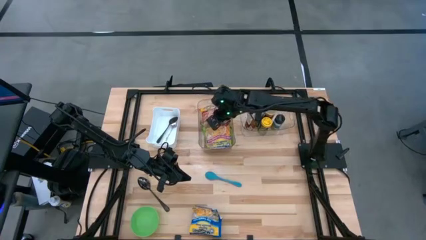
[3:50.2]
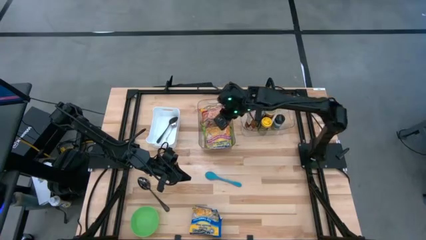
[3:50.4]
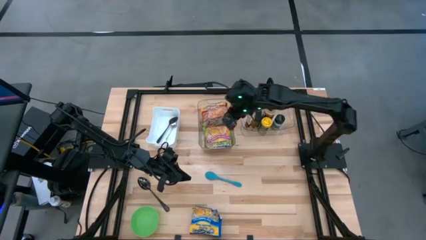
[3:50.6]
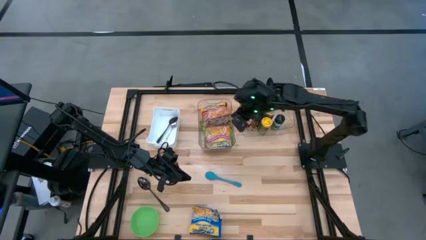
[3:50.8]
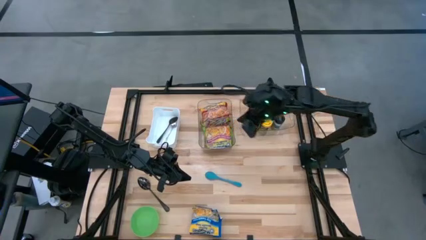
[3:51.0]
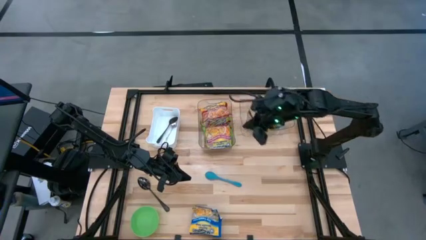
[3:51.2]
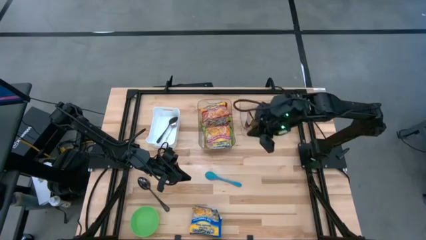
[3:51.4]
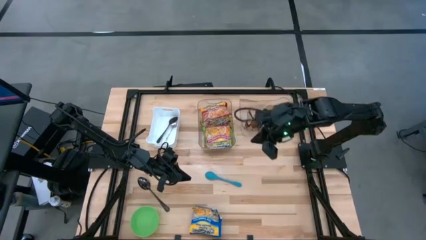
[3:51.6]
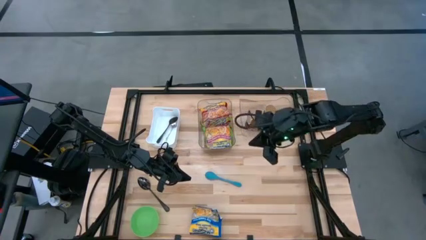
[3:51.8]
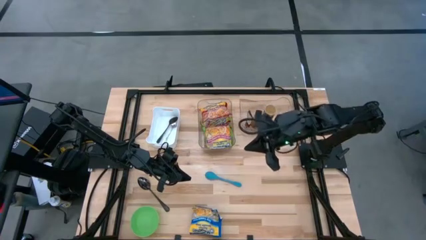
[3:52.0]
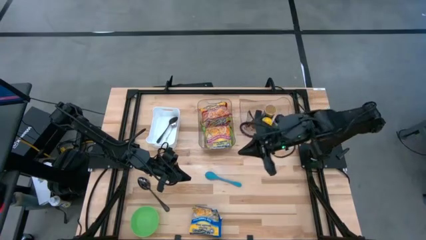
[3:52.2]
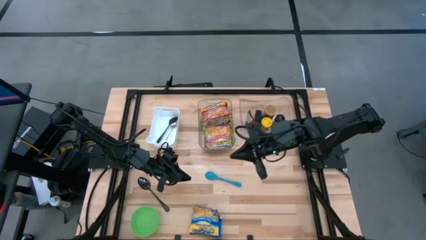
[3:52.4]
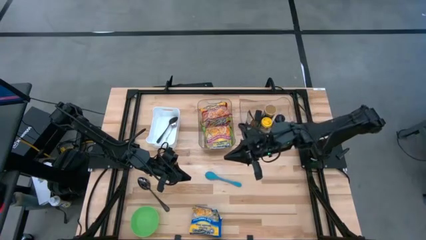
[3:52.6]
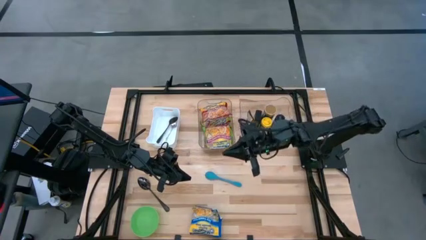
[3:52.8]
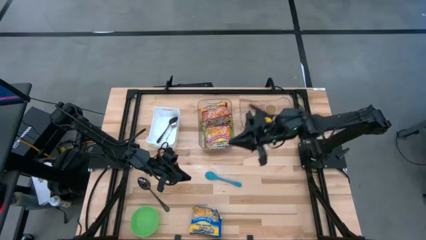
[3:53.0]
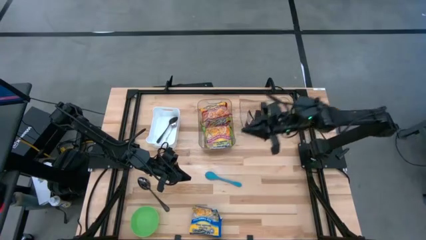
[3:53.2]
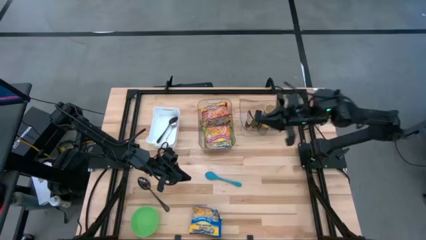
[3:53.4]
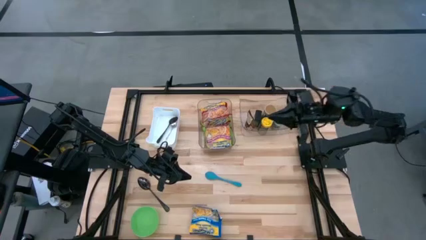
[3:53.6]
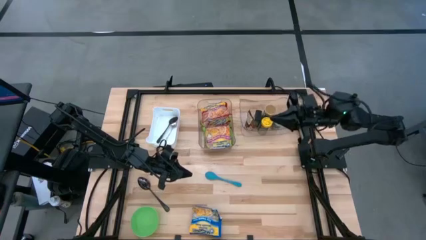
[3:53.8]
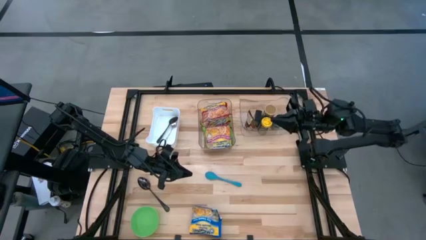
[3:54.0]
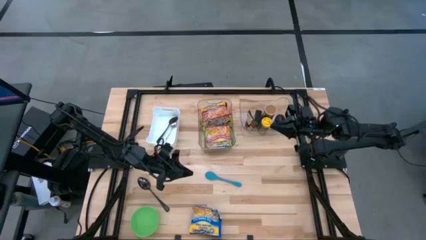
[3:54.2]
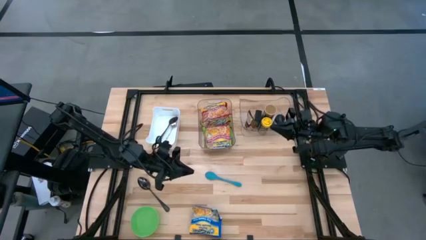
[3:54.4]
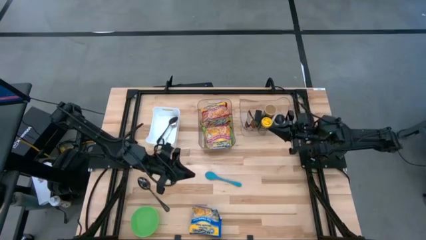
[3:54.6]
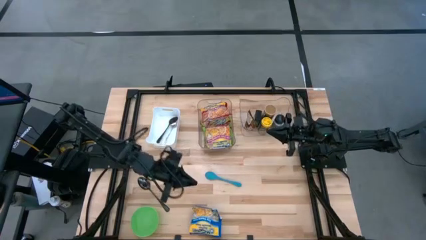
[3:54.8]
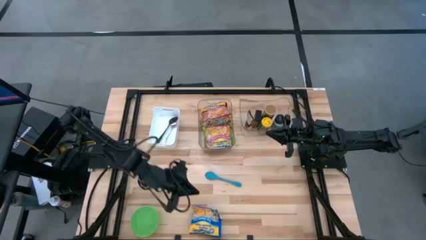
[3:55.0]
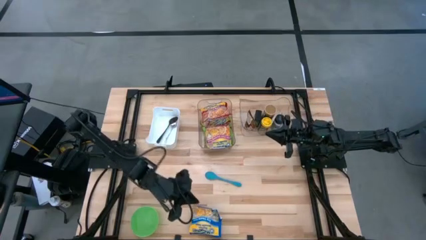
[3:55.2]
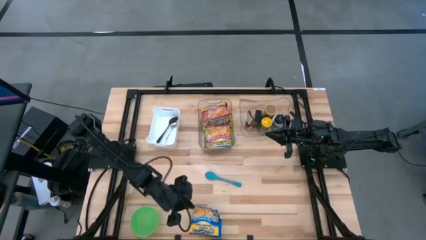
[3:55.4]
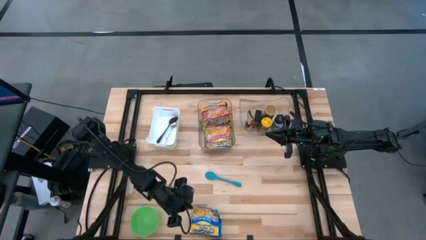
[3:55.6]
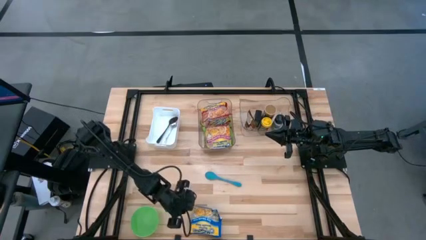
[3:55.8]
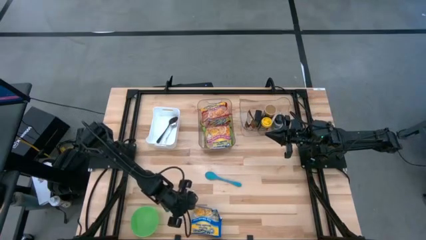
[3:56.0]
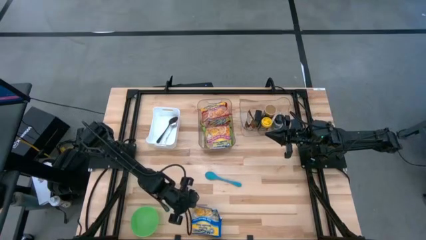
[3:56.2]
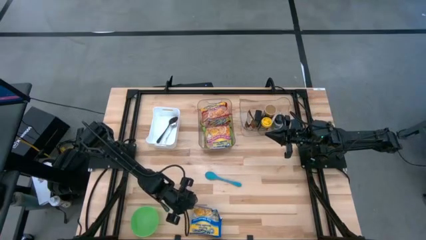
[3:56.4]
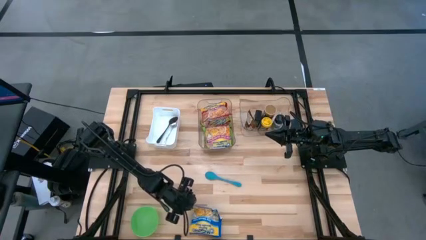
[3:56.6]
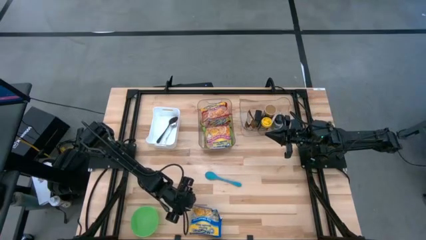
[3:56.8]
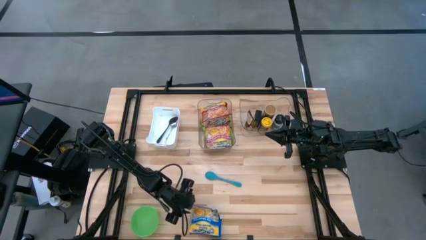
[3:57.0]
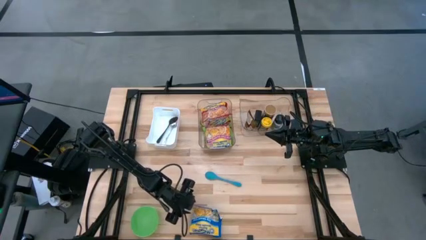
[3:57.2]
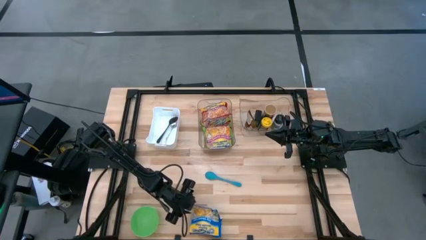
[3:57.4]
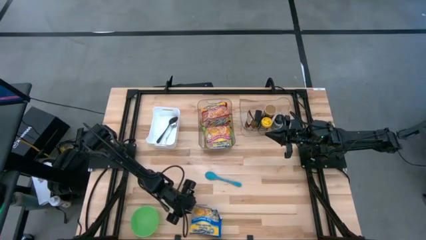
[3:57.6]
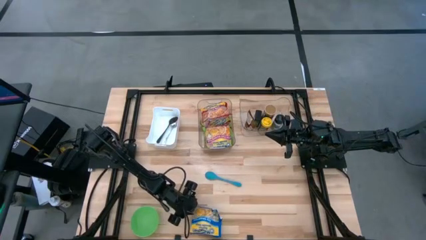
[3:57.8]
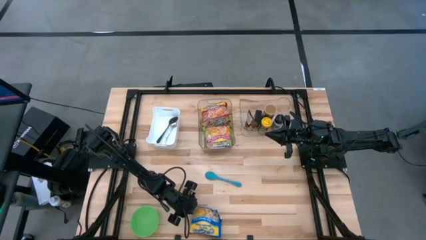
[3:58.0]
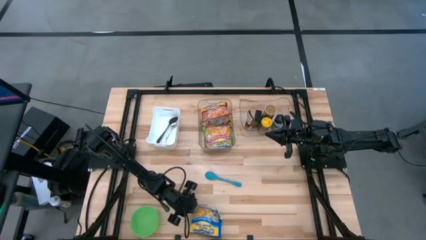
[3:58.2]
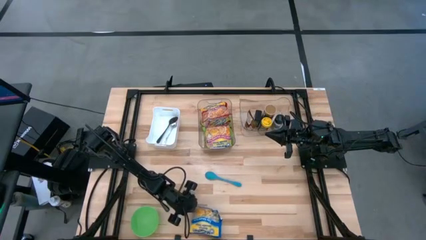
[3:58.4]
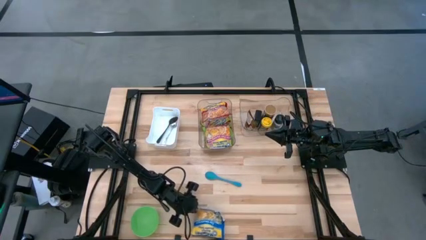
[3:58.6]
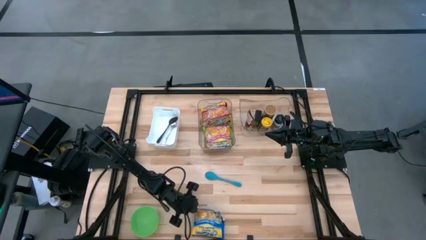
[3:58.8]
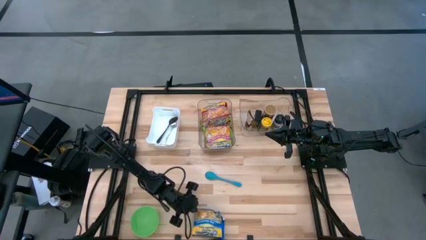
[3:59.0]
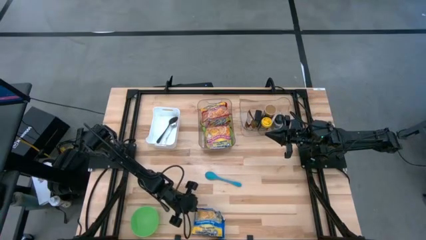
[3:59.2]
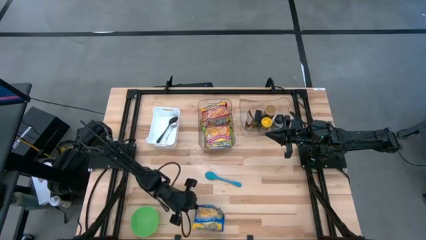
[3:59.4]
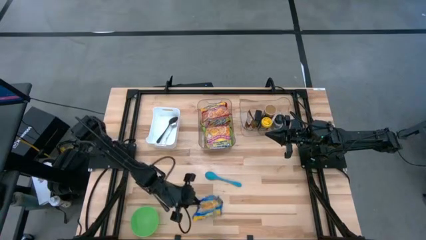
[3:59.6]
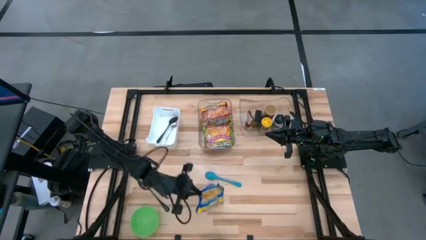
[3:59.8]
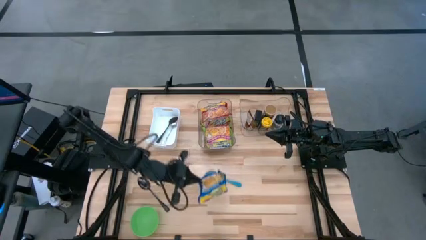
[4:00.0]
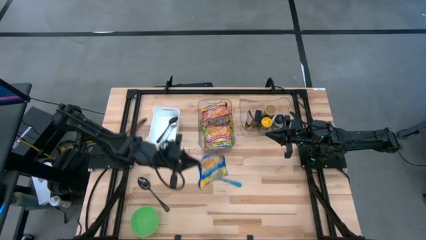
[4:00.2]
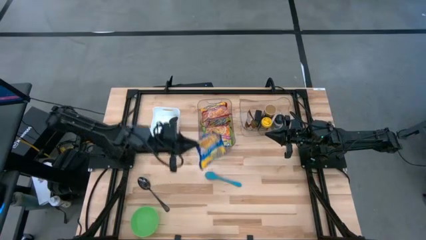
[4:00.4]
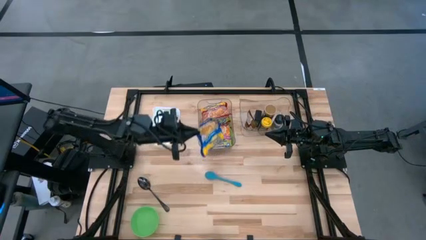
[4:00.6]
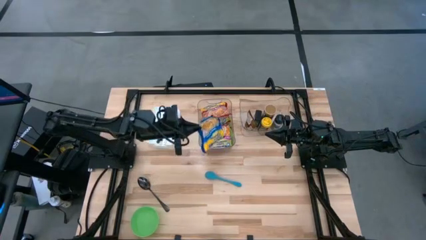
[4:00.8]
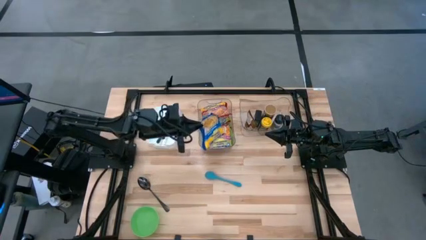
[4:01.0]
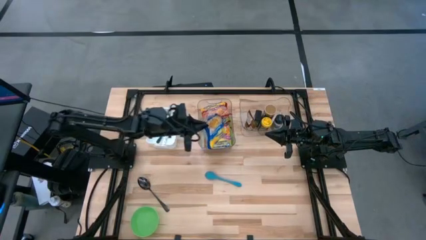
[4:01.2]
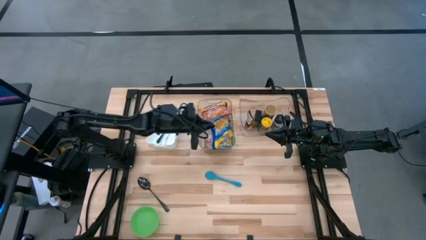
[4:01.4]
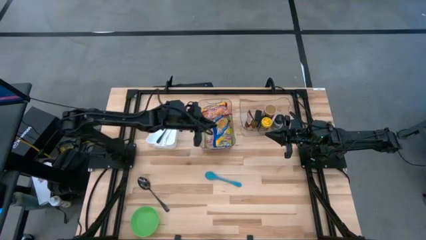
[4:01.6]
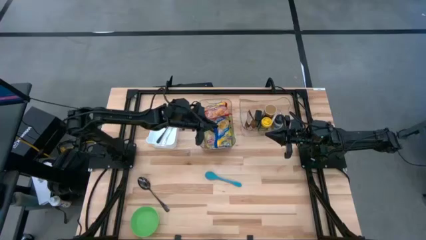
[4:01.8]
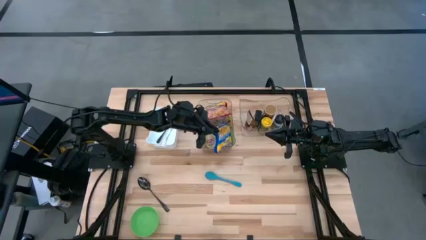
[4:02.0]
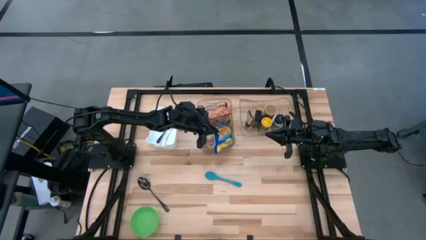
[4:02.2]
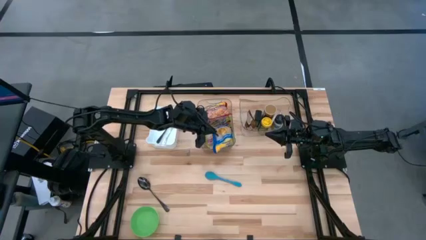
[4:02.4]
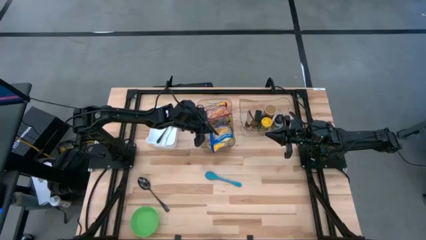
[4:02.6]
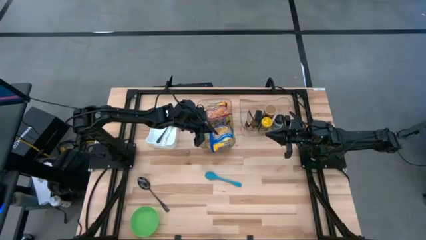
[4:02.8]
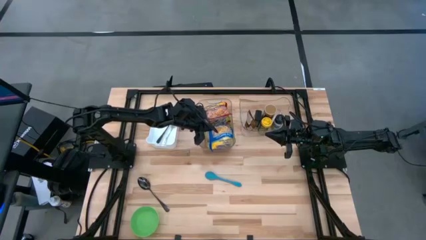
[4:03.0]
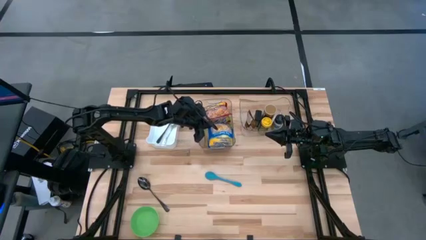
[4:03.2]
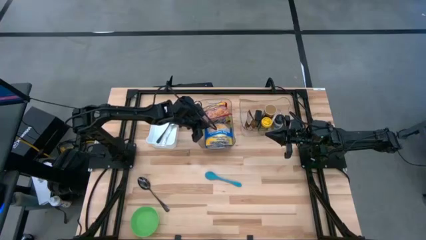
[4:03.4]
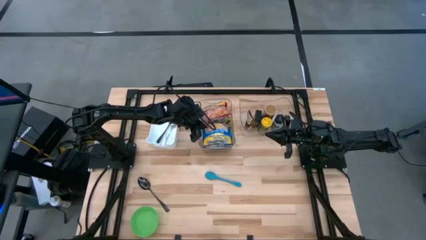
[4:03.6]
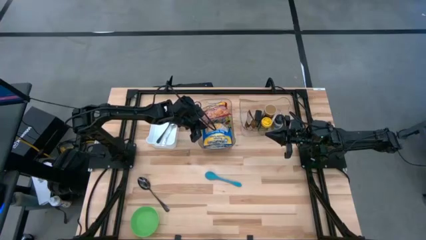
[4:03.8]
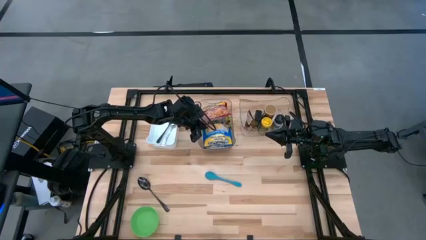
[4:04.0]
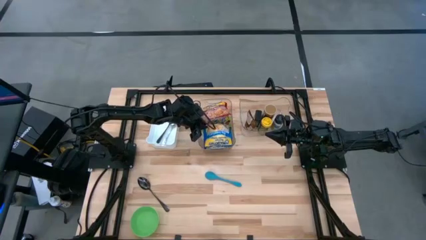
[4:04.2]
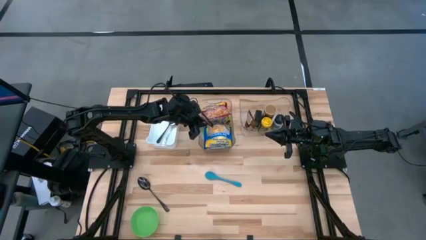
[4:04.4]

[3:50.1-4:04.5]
Task: Pick & Place Food Item
Put the blue noodle pack into the left transparent bin

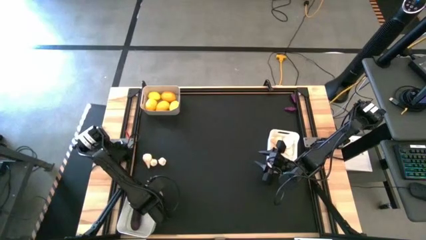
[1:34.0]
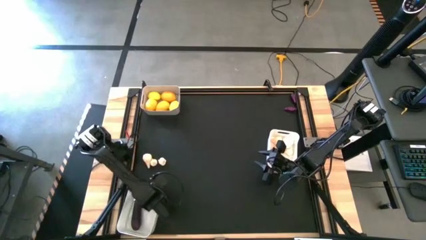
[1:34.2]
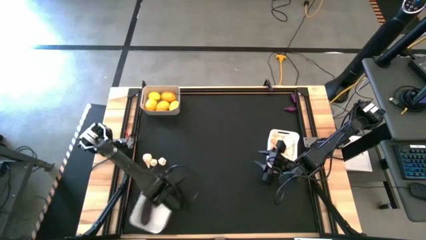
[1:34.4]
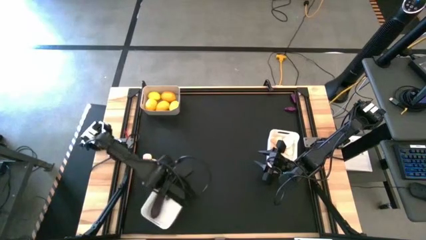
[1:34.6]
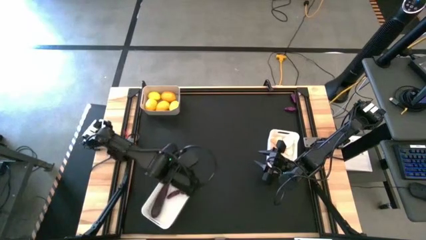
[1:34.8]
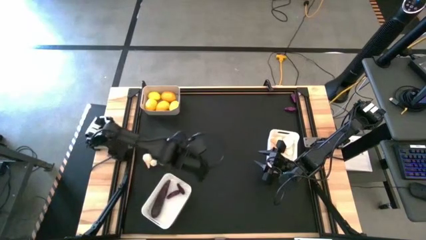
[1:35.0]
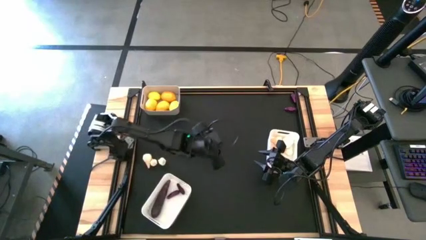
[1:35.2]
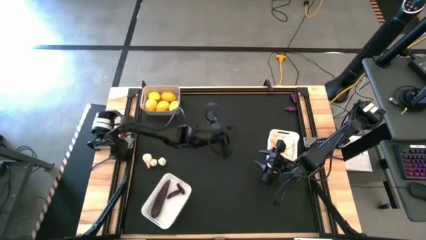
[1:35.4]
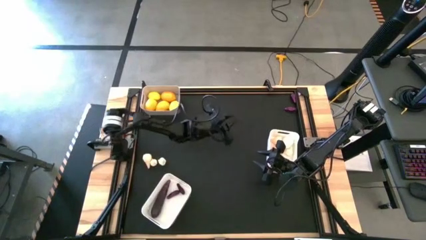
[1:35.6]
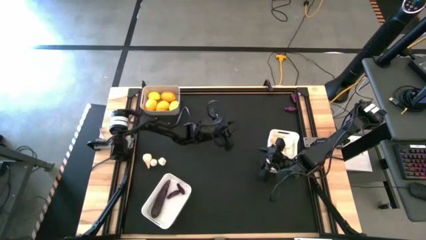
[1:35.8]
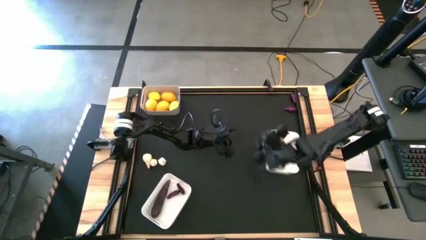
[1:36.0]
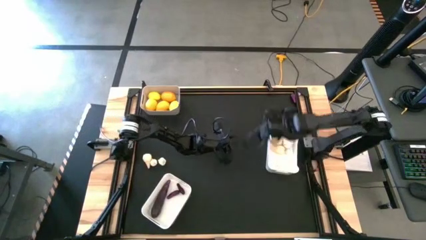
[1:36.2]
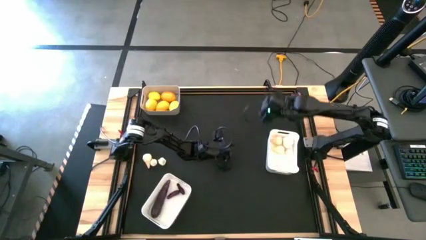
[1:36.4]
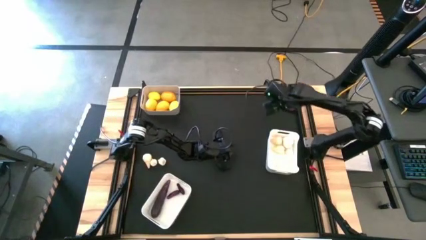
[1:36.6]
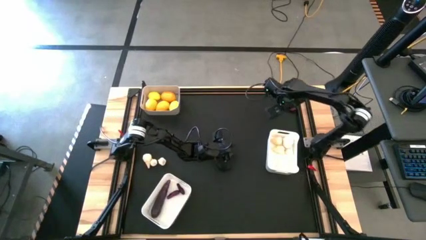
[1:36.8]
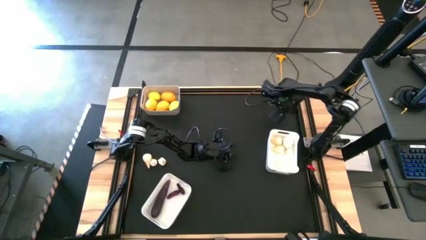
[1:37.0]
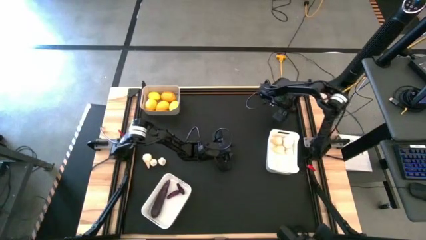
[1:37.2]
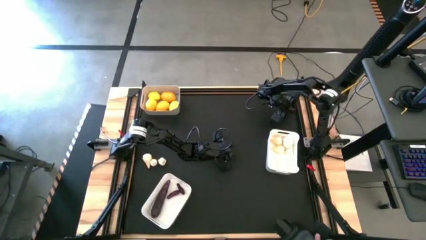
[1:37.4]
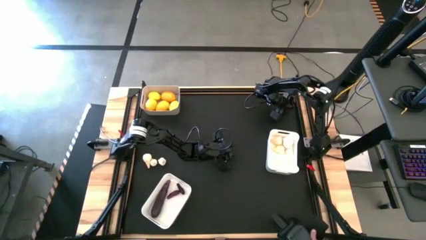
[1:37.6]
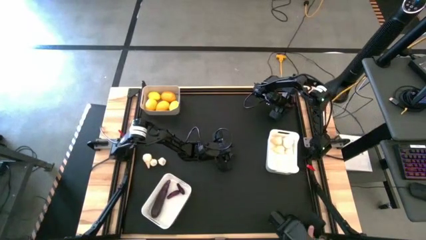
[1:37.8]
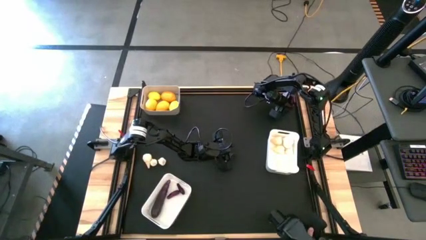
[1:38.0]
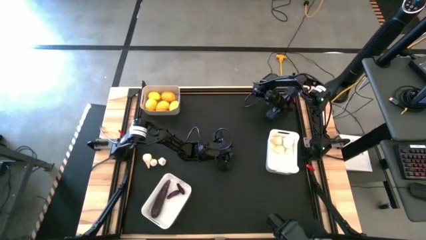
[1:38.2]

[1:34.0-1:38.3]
Task: Sort produce into baskets
Move the bottom eggplant to the center on the table
